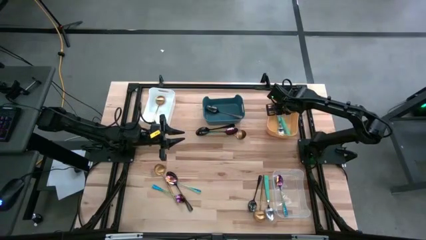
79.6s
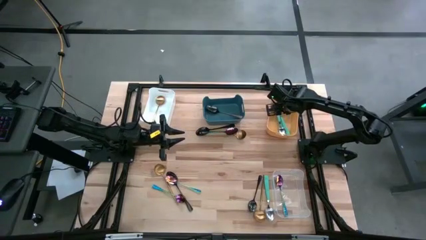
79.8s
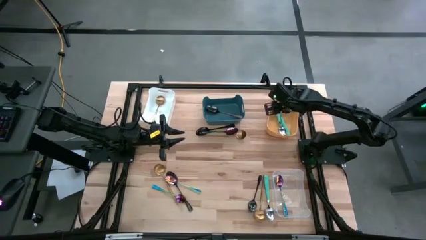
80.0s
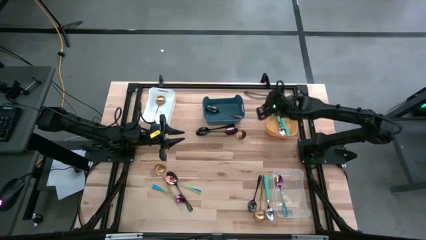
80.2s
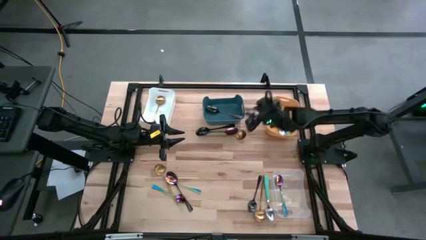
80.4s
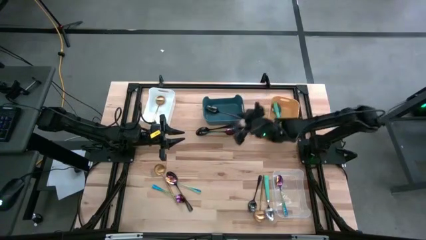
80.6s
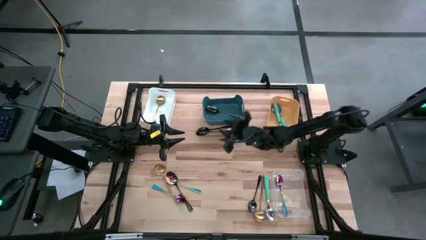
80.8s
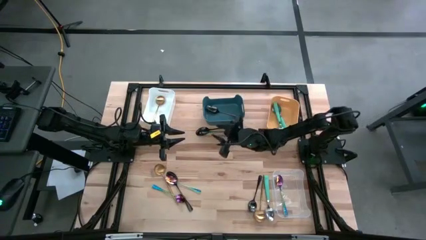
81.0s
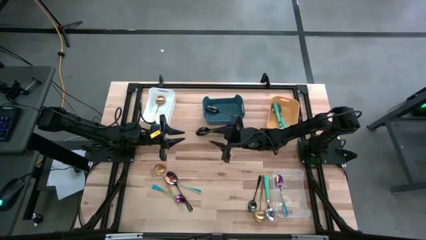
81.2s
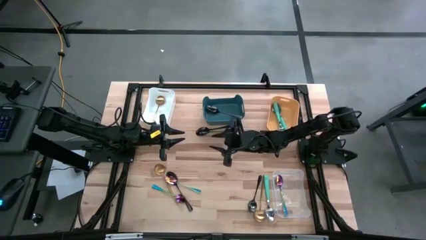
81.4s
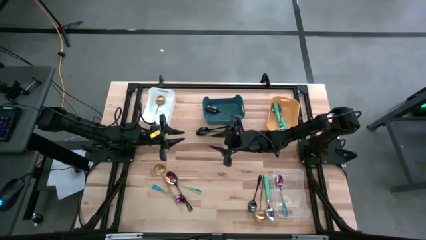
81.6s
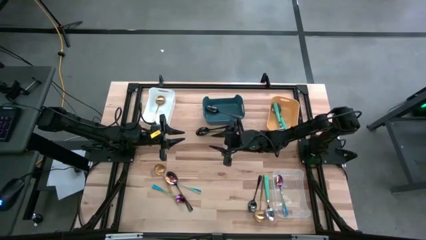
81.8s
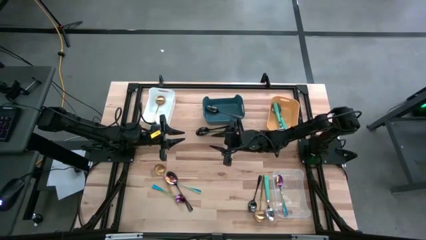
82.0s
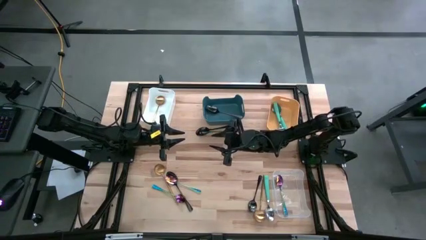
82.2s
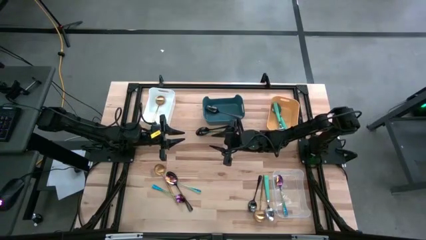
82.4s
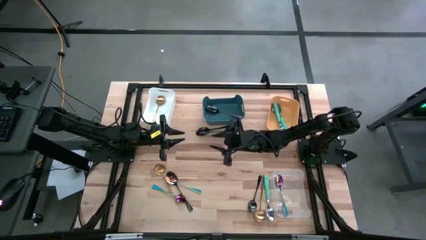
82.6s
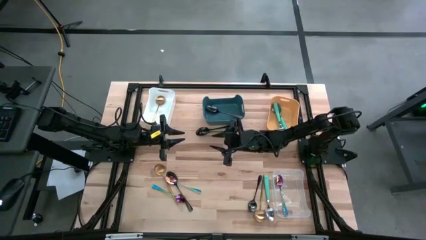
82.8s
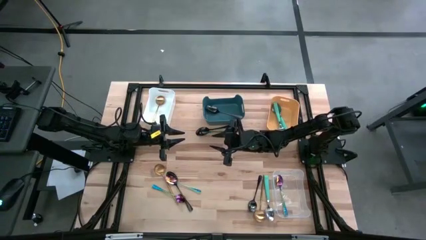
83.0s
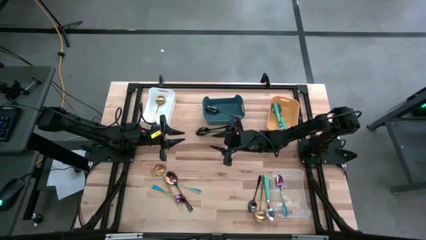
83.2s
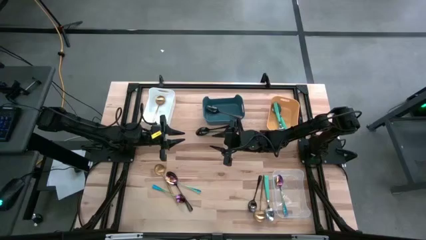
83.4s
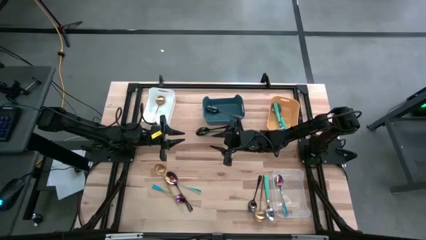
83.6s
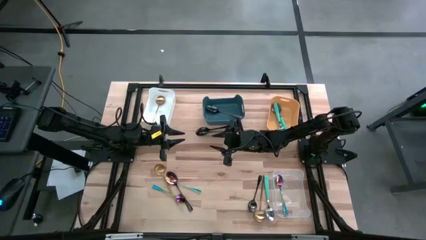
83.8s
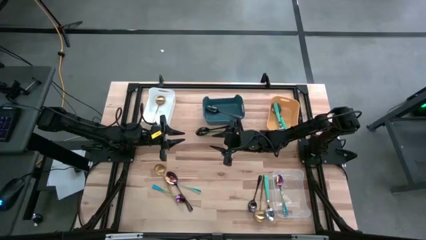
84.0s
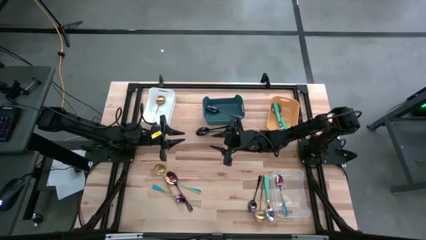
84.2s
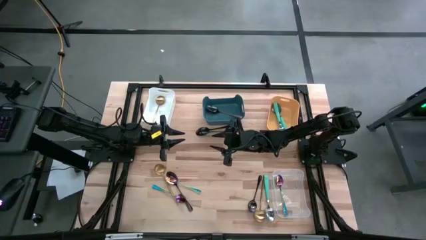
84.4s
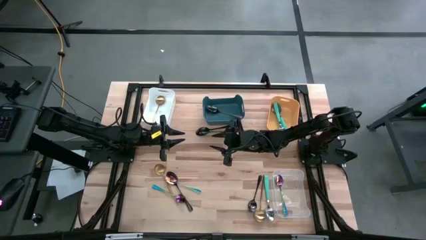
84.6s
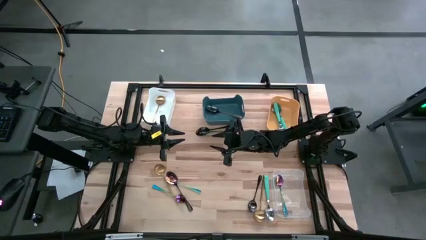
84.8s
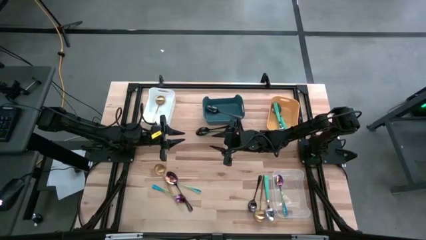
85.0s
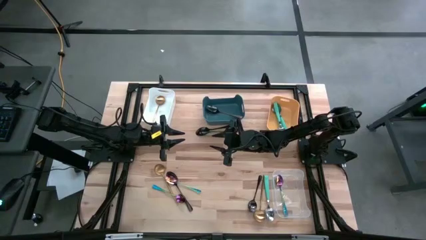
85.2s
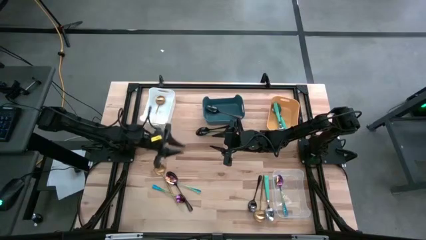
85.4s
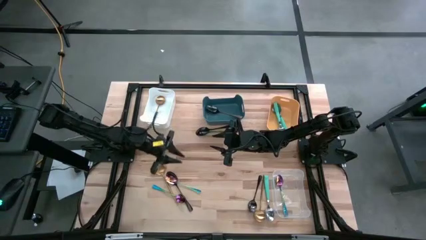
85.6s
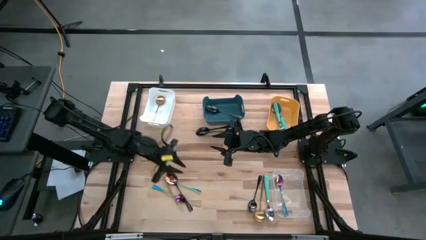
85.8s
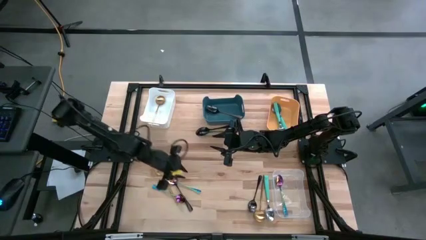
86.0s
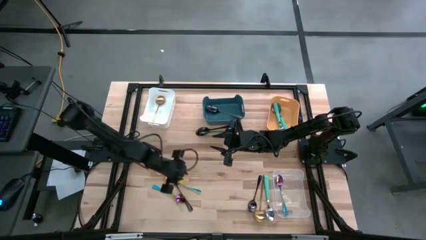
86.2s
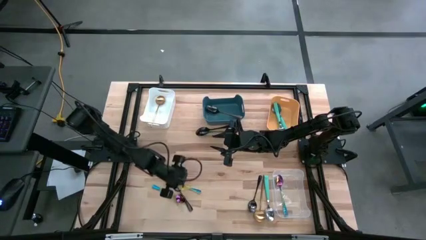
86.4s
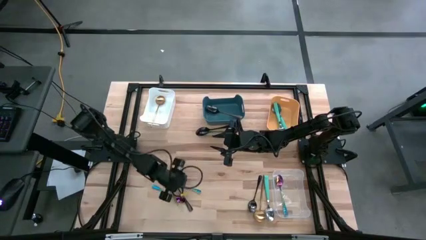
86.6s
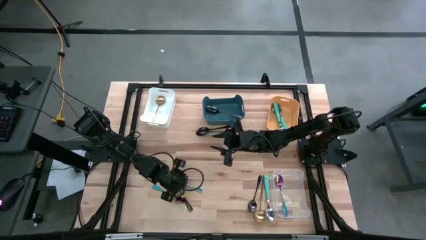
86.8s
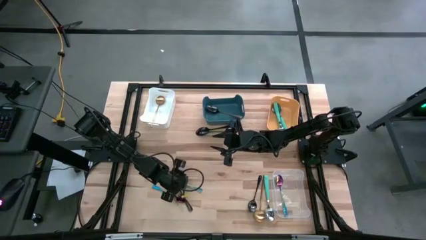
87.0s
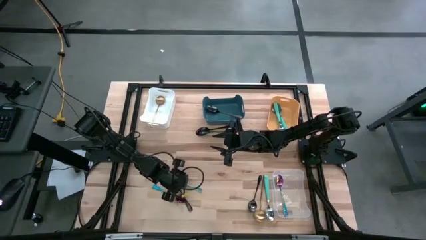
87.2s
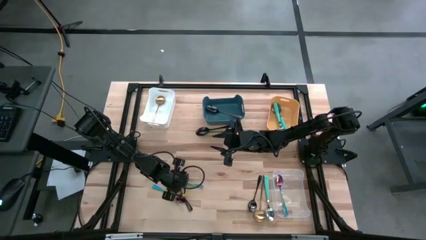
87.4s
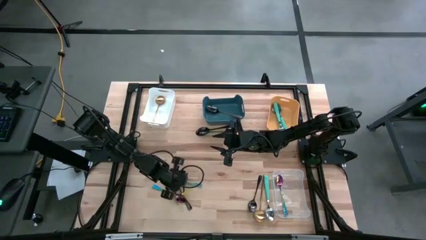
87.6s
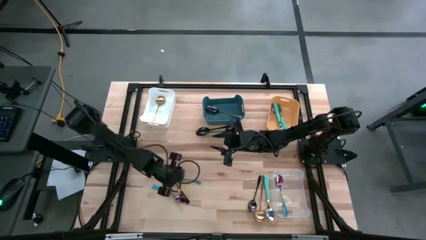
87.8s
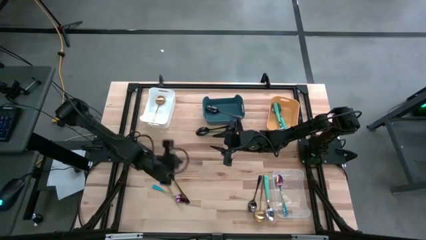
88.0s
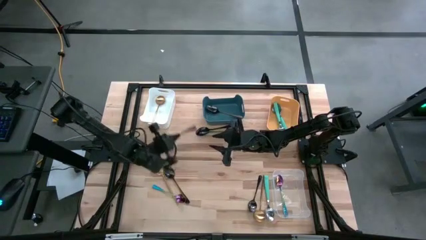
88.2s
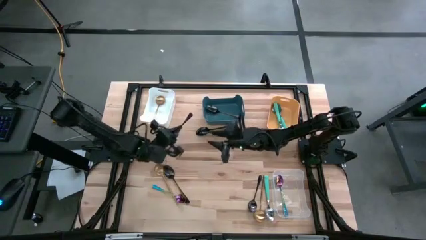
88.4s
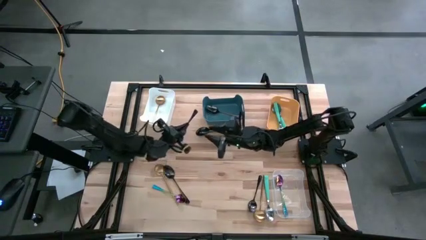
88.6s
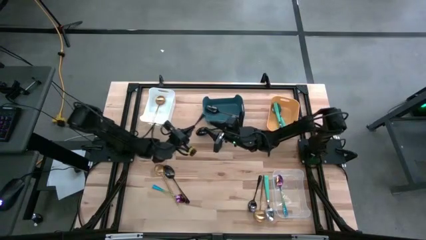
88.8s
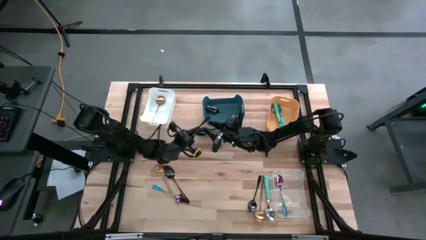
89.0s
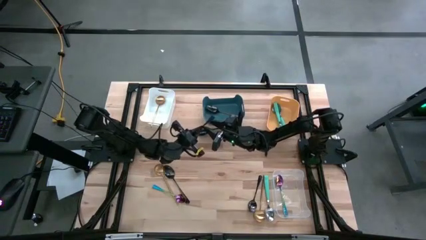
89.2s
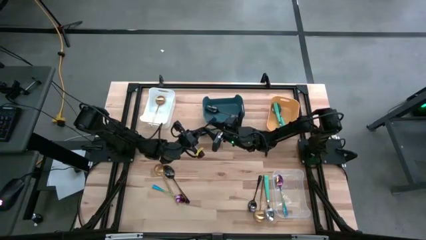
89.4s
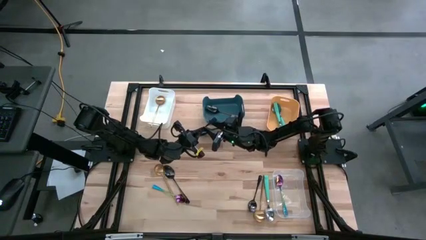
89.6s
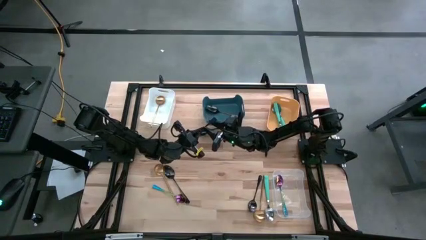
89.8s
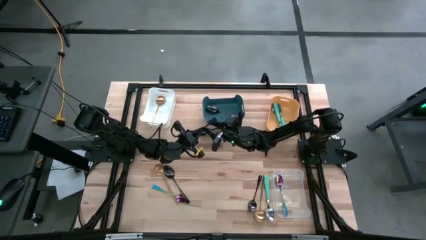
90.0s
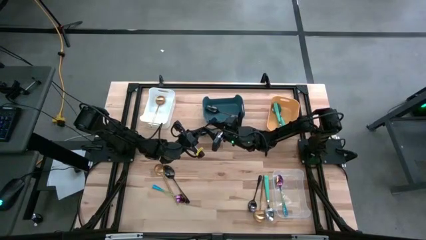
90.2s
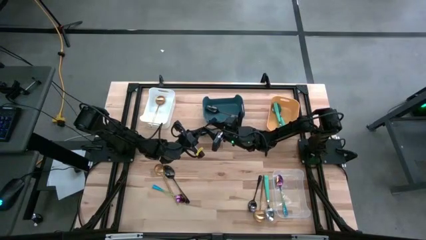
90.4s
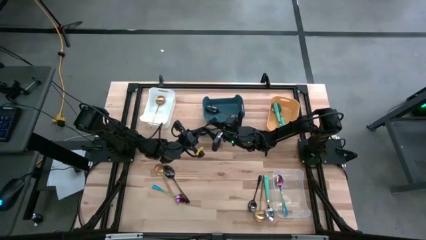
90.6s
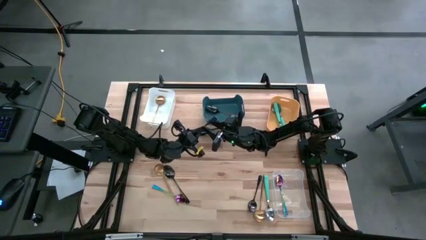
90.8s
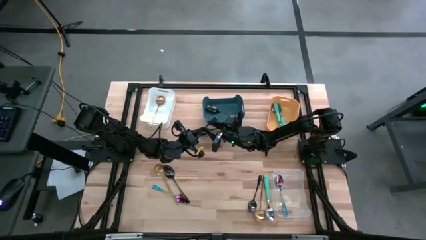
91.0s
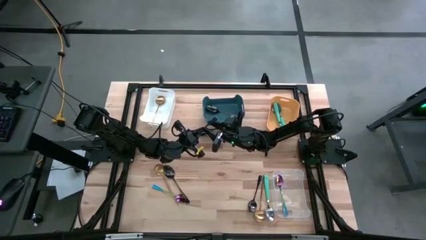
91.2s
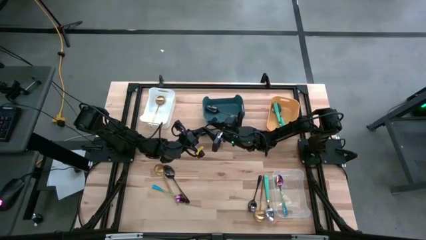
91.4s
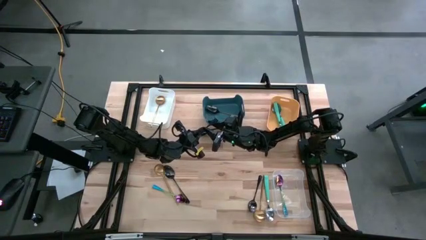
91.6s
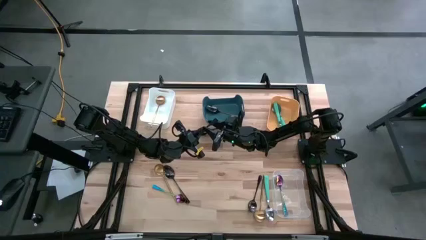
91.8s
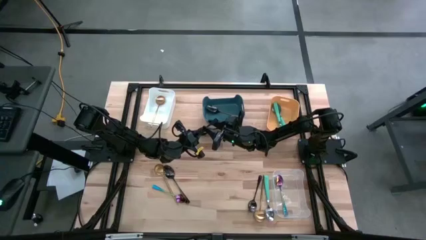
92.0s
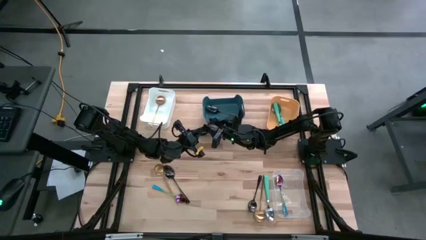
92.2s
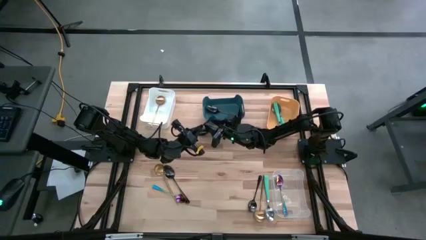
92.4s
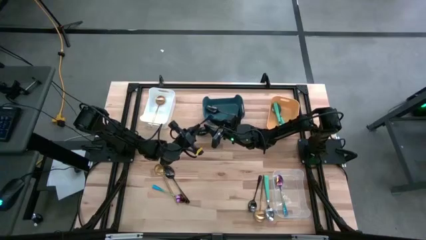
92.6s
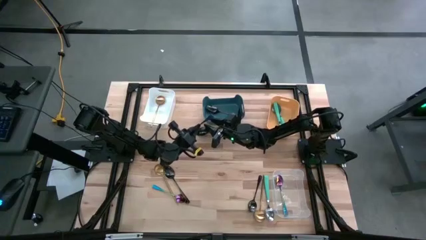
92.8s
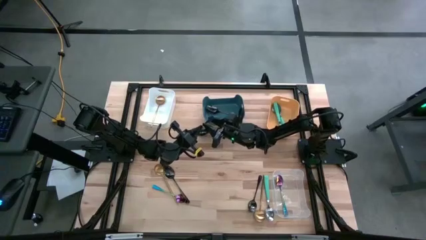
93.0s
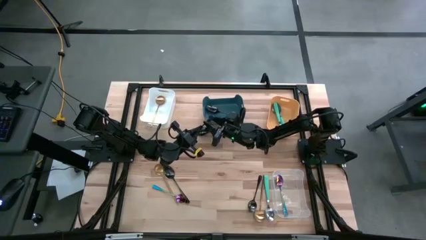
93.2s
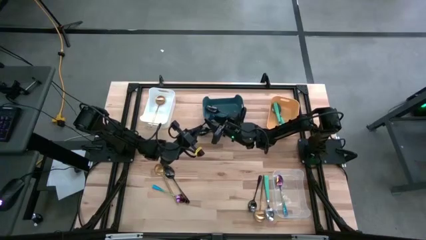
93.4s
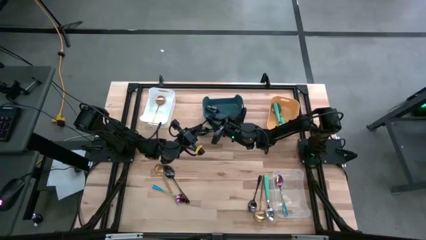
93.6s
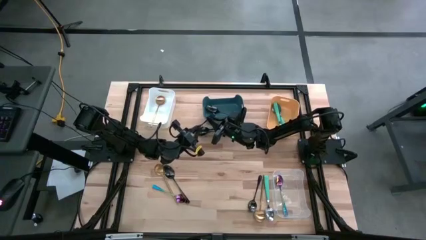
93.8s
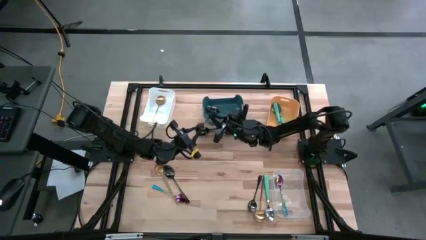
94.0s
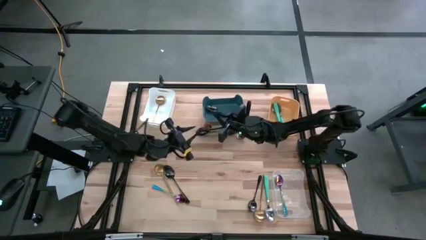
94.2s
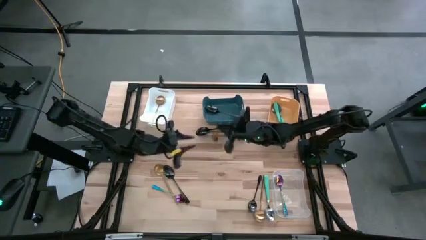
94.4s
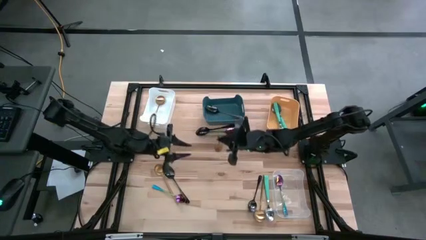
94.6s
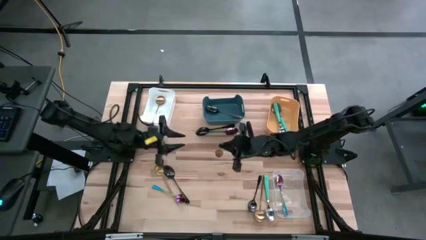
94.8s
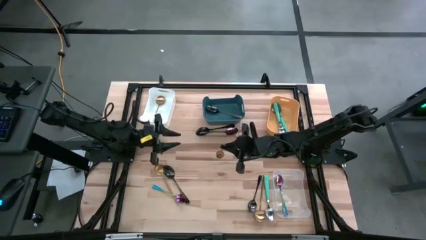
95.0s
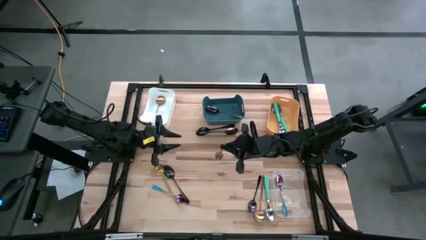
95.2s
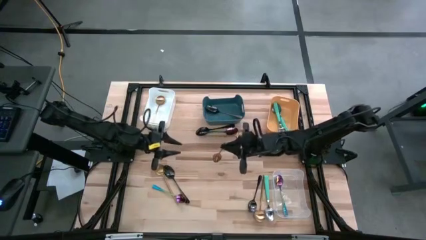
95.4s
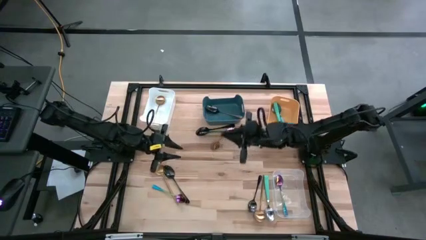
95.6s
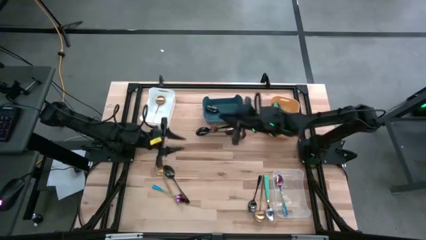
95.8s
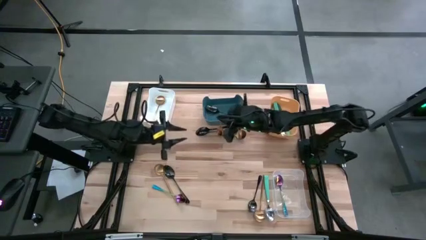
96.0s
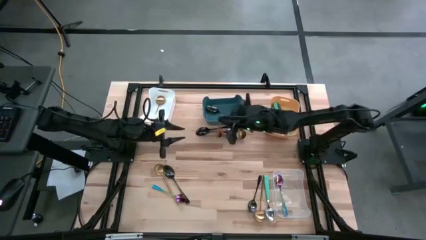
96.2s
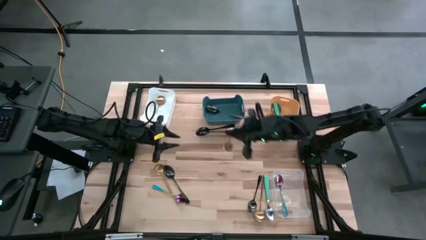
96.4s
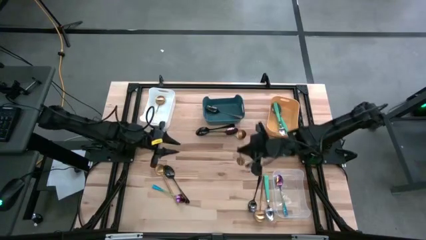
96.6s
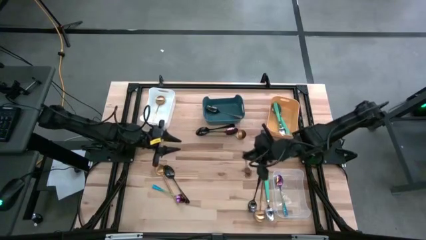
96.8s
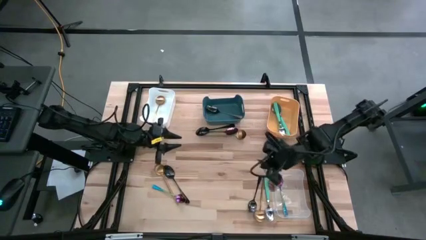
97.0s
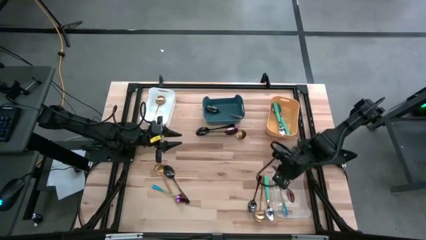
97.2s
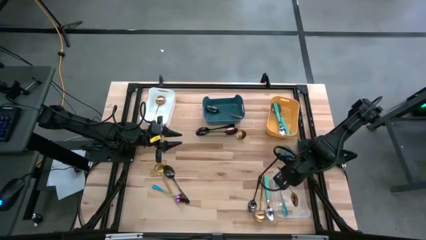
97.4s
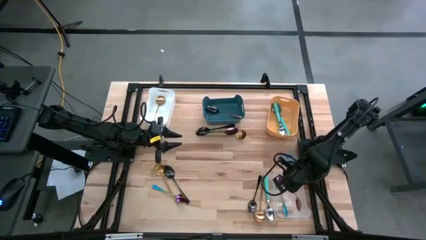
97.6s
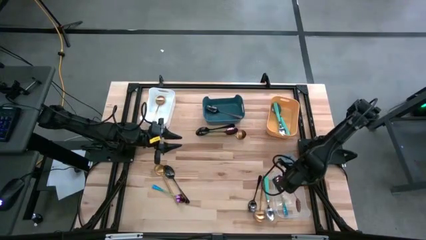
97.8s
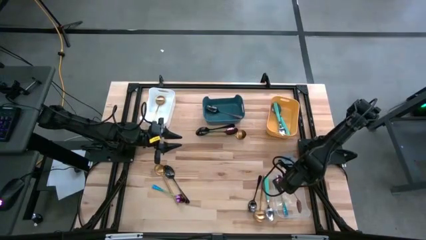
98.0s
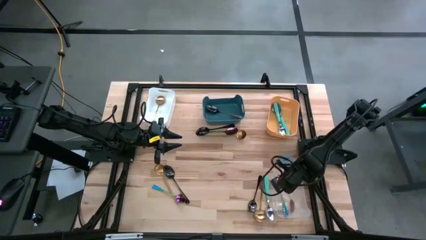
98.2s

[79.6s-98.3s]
Task: Sort silverware by color (type)
Put the purple spoon into the transparent bin
